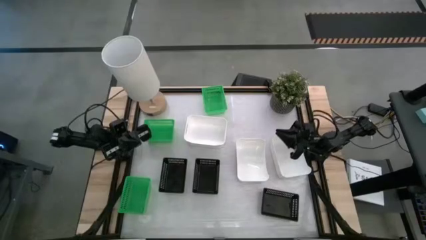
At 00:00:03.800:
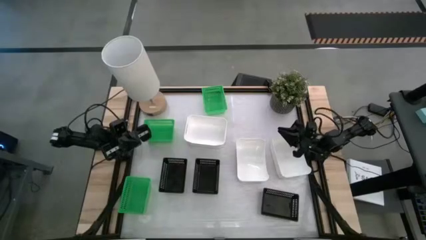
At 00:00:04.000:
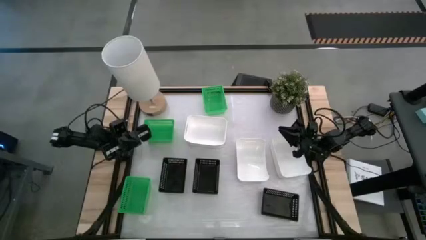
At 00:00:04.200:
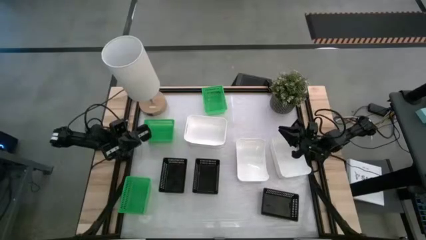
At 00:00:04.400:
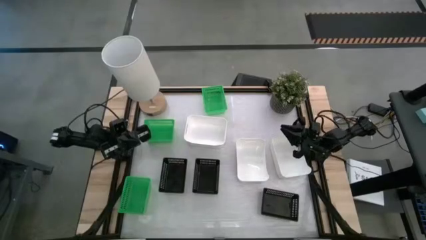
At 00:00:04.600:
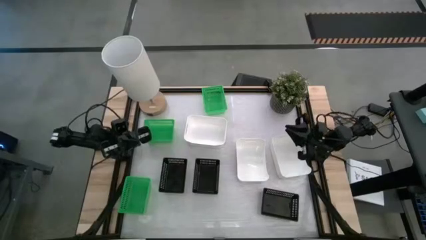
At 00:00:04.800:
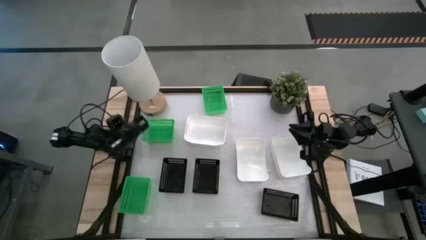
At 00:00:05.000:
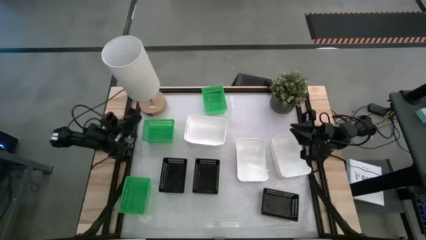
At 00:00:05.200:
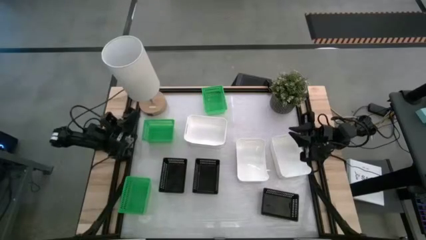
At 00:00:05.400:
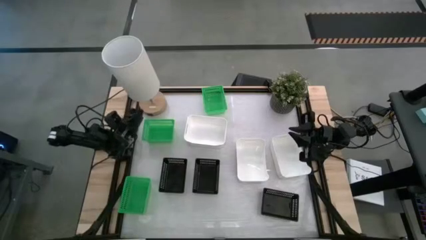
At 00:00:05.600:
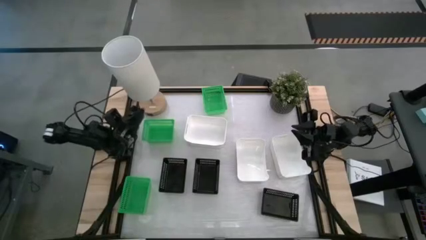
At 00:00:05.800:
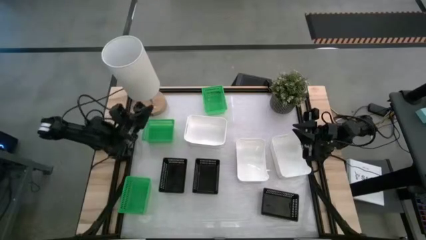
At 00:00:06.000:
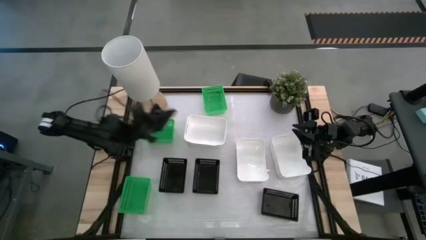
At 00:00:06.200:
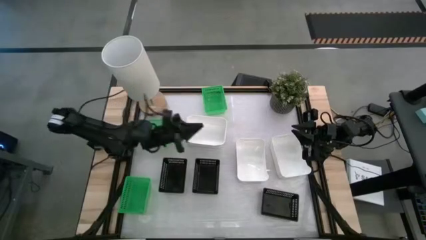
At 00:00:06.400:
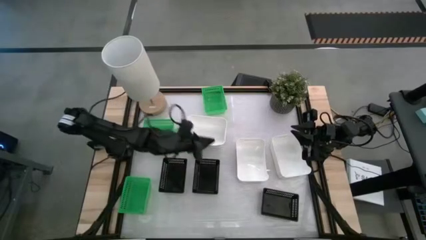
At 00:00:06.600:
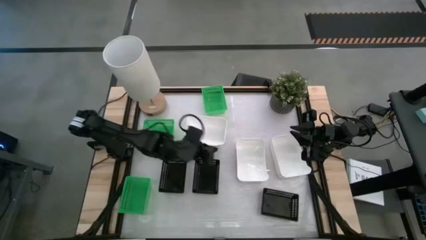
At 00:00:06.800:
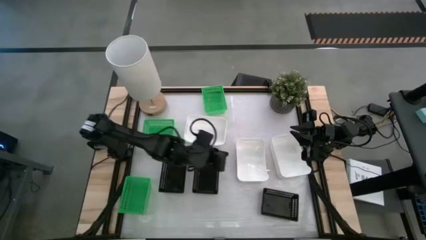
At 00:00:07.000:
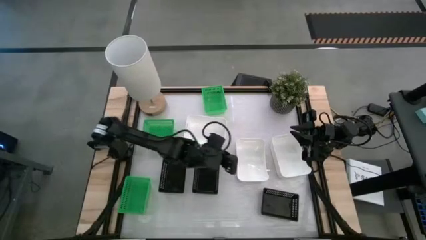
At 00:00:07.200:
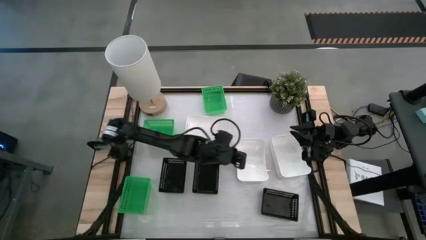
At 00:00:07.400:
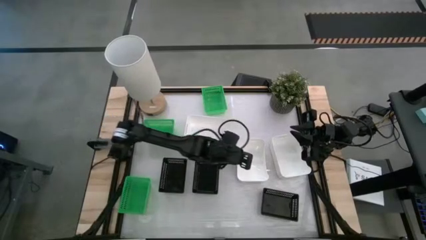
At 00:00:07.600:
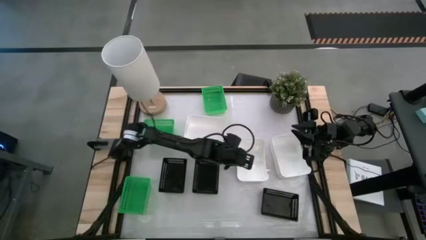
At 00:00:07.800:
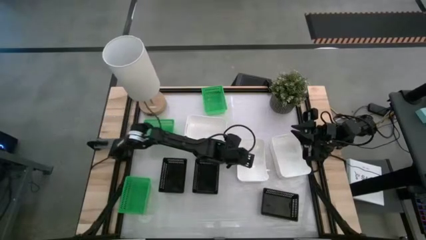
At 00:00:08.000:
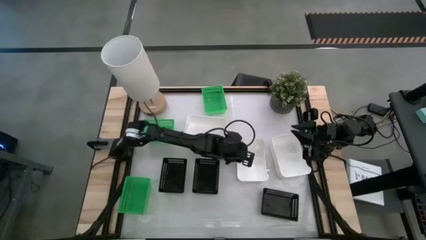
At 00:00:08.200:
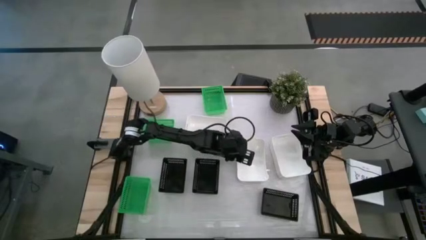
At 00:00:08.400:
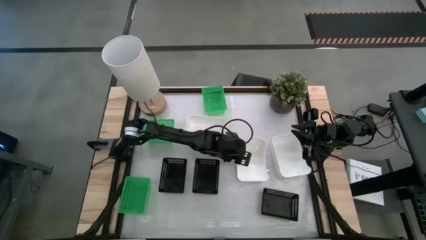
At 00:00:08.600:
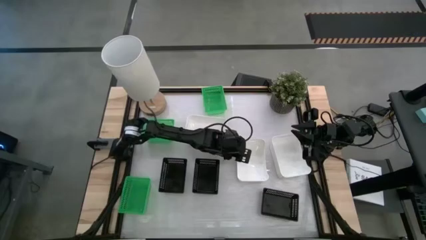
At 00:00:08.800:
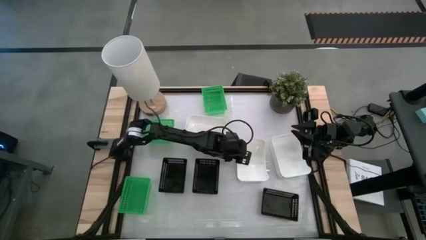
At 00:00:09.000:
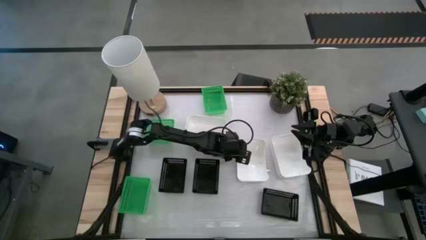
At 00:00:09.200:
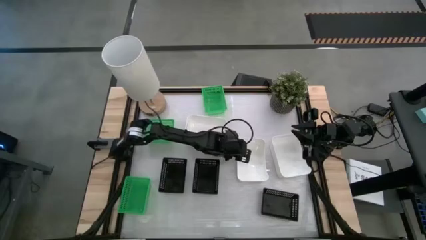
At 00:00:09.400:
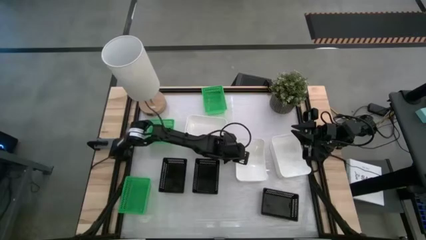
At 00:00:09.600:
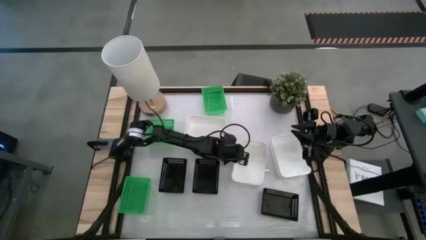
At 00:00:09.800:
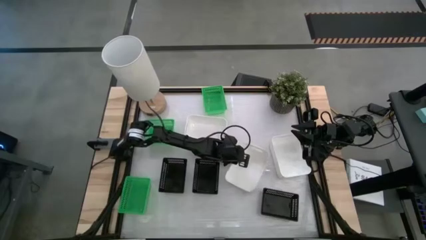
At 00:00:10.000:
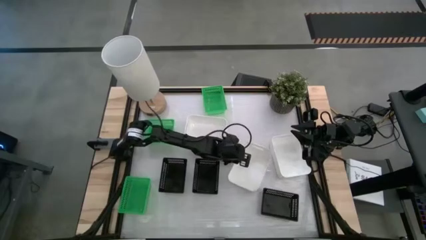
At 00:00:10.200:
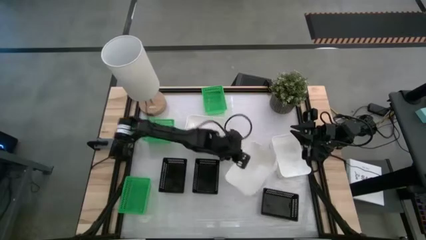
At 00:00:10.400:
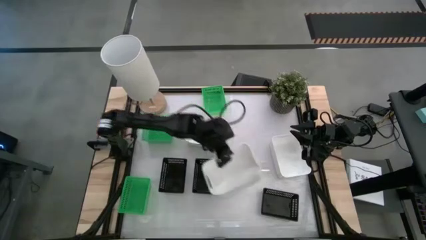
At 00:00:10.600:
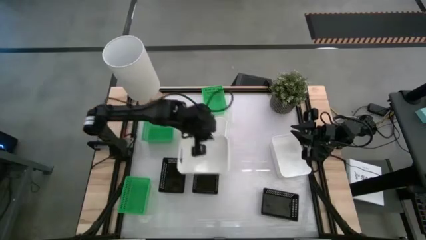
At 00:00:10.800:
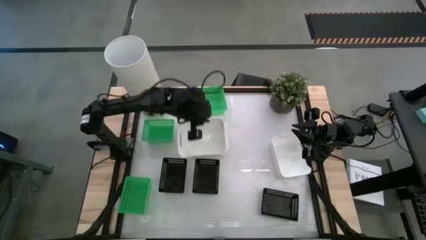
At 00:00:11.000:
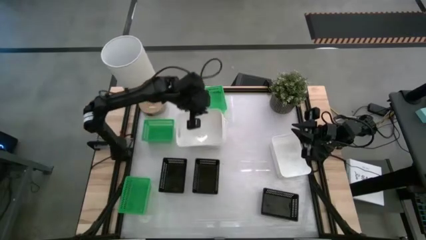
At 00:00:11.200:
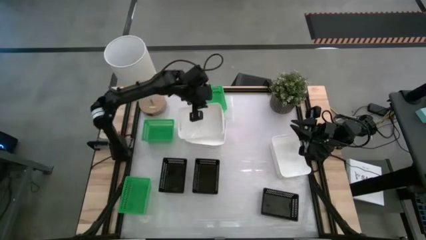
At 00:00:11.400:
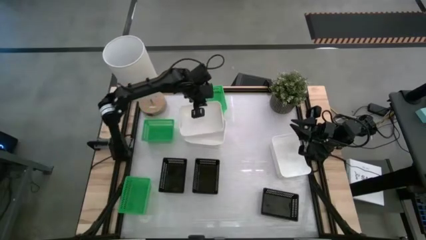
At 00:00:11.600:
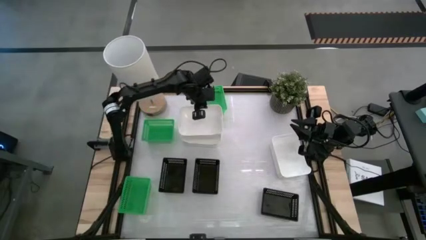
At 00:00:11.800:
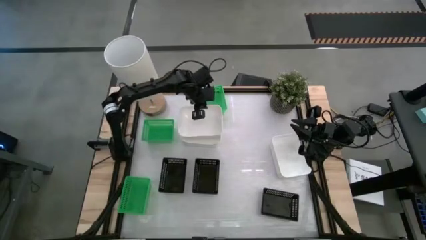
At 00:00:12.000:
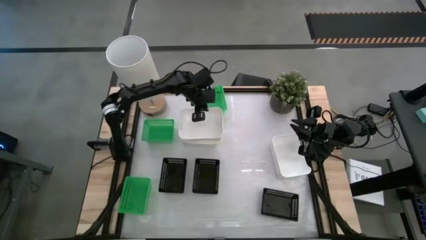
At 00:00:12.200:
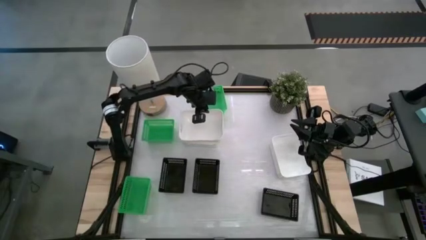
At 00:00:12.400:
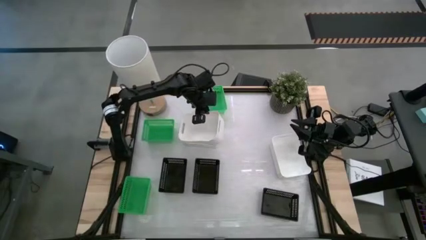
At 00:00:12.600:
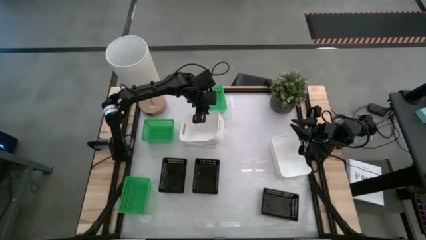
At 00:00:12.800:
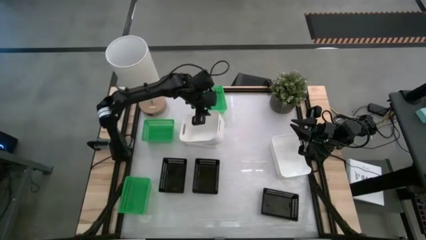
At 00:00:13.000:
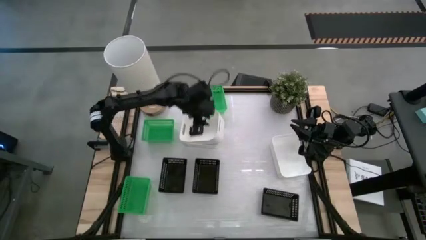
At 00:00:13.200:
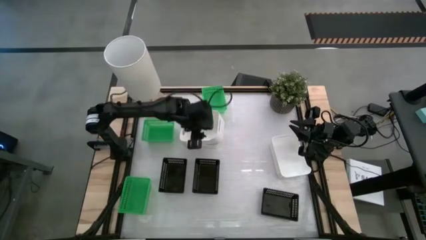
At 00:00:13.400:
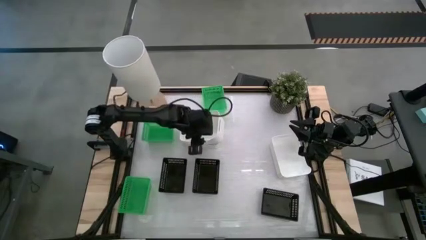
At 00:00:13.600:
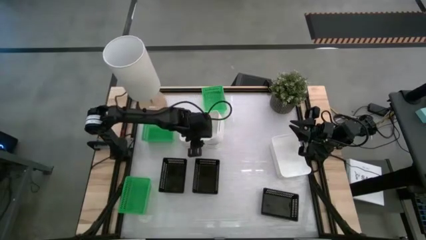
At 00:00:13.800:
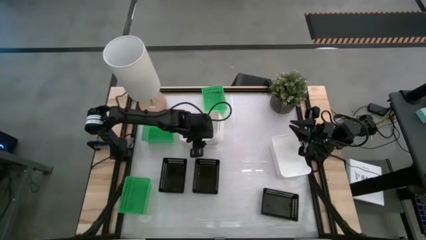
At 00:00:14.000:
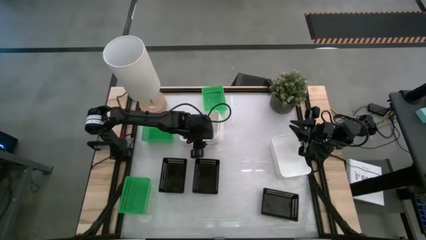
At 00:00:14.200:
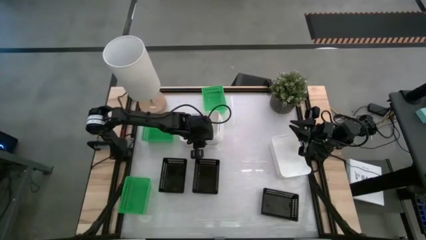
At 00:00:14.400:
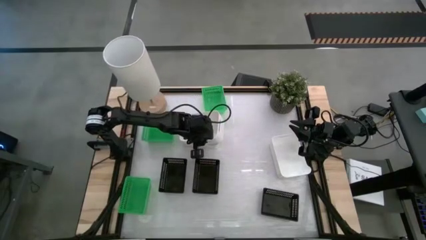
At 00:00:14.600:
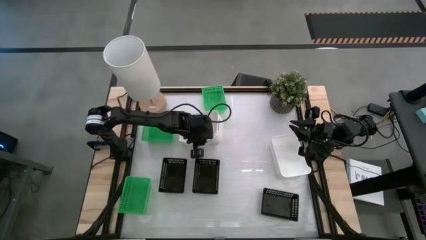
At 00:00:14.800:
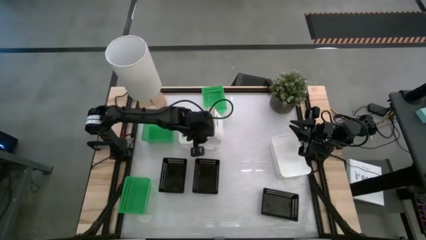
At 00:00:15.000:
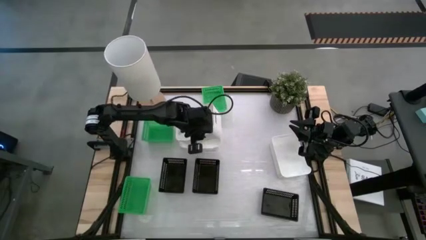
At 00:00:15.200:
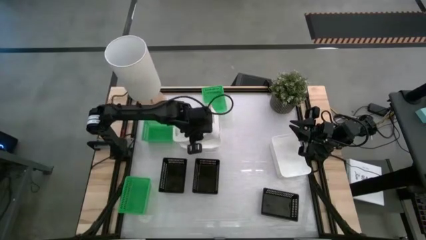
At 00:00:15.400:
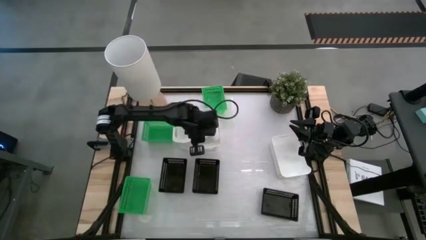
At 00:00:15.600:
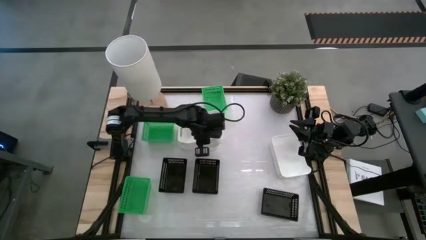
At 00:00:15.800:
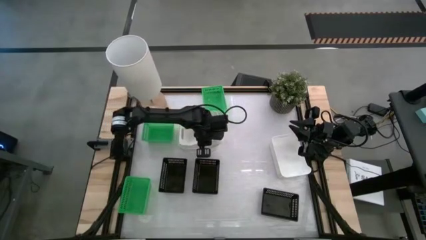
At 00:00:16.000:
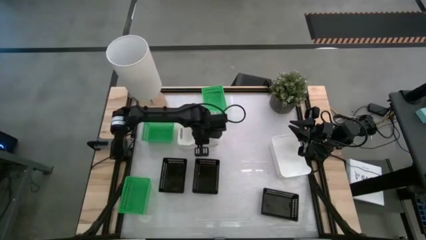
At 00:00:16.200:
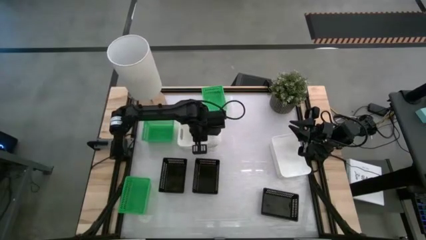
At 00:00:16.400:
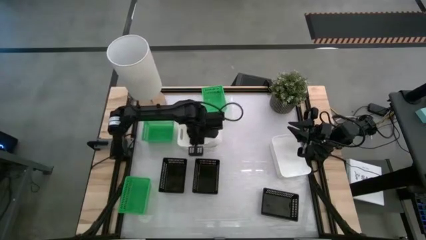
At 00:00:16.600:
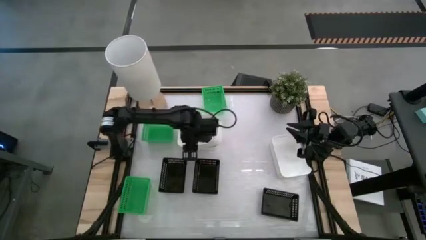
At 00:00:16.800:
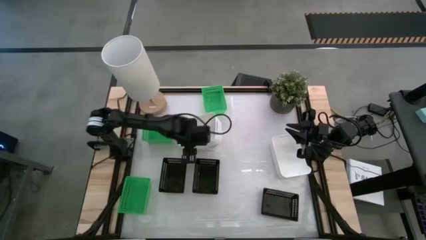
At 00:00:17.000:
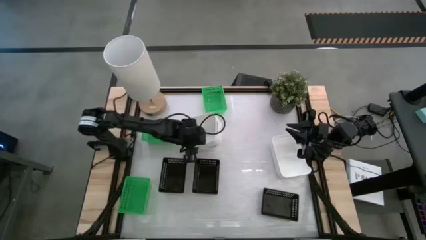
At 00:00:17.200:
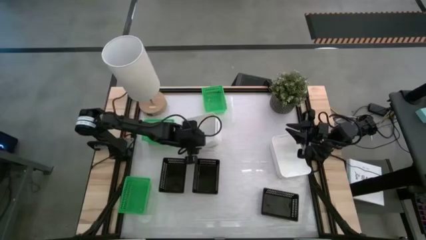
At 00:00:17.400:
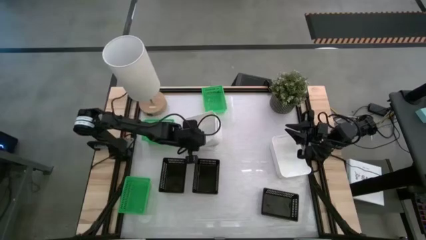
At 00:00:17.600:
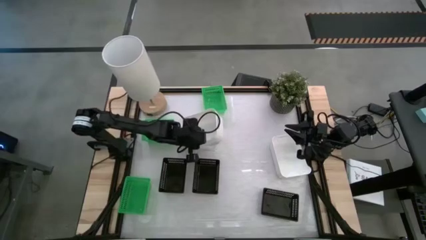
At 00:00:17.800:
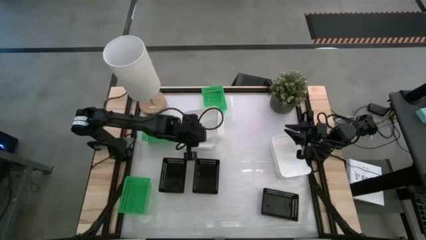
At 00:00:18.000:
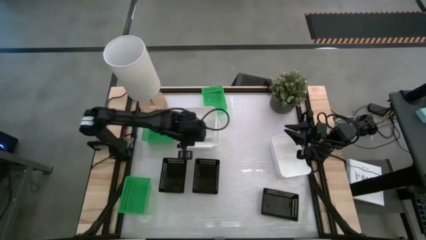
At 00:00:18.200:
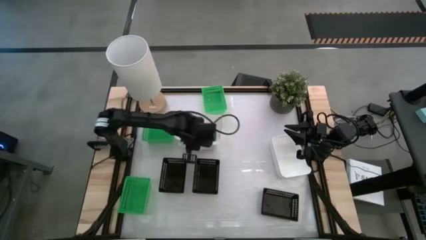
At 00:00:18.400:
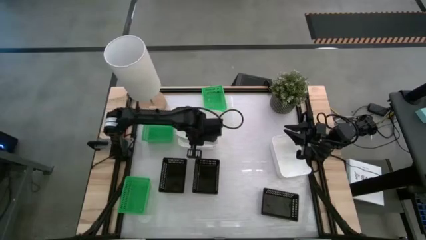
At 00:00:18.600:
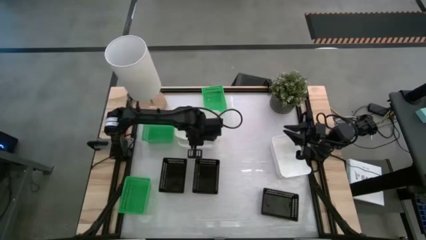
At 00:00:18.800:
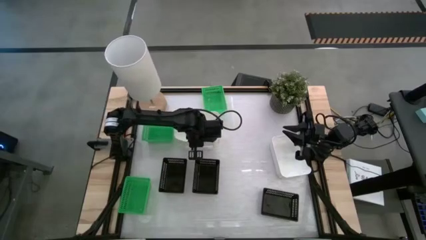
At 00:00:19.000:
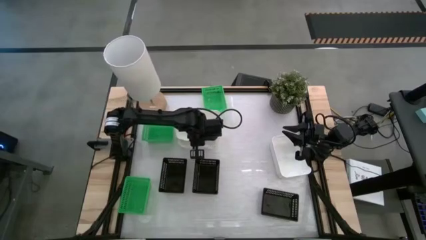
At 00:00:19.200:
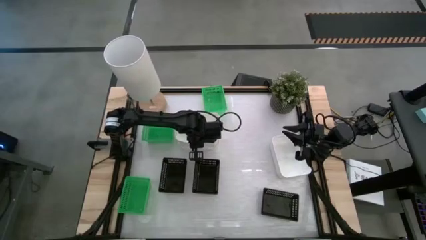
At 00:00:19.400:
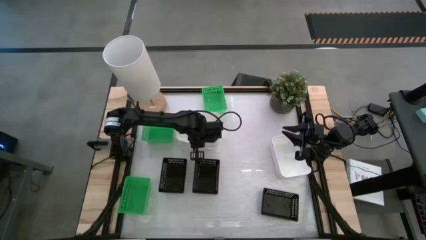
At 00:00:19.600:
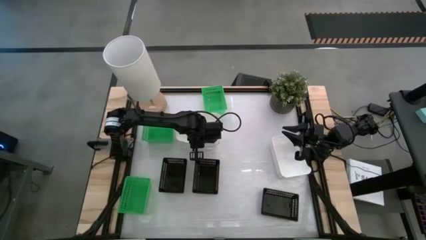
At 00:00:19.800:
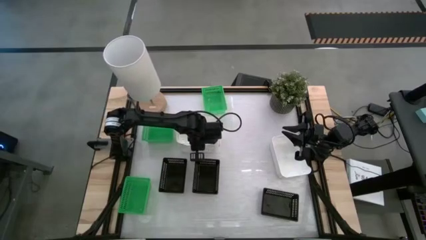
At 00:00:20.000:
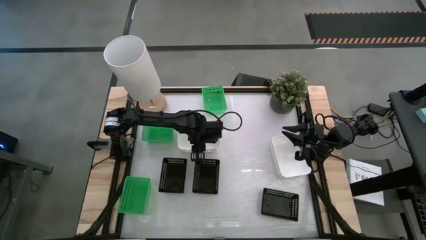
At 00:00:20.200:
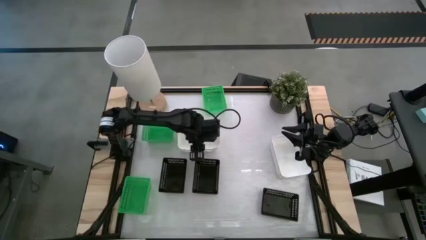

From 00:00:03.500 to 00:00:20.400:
Stack the center white bin on top of the left white bin
